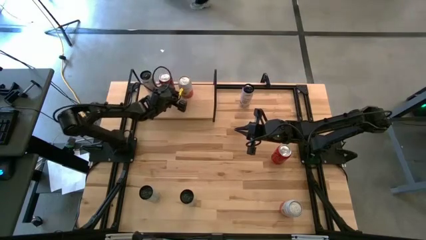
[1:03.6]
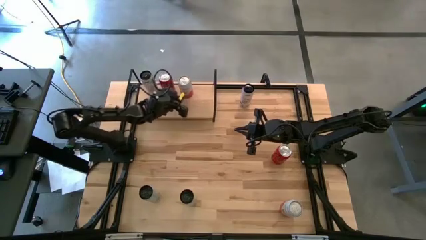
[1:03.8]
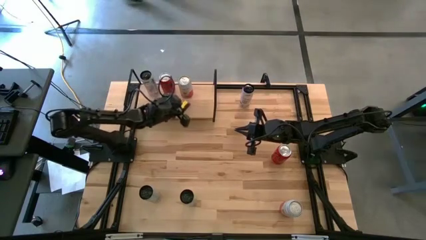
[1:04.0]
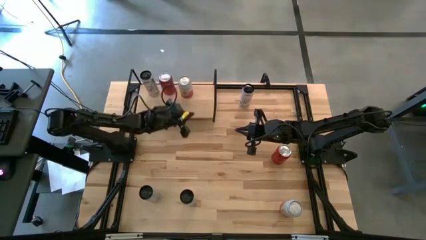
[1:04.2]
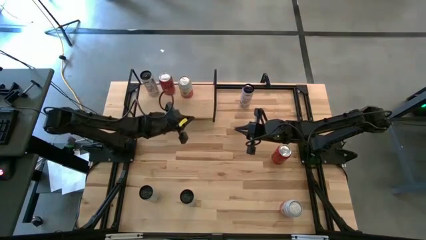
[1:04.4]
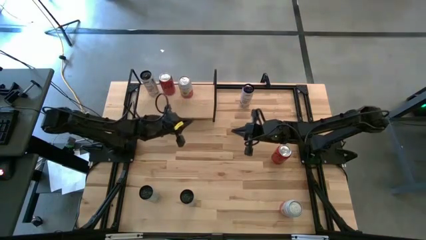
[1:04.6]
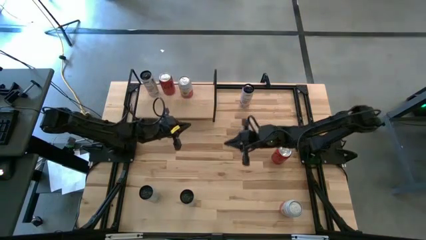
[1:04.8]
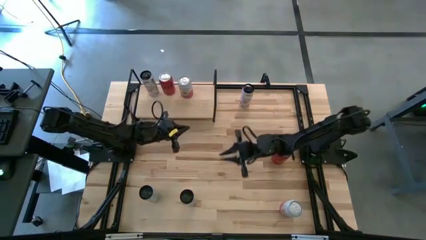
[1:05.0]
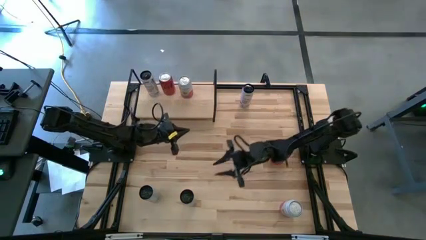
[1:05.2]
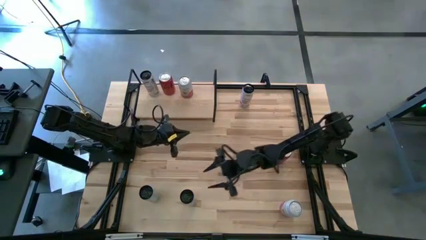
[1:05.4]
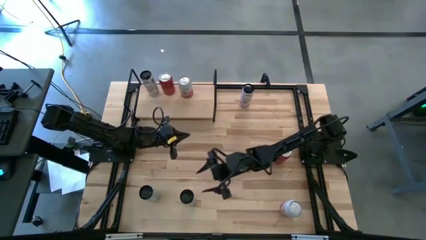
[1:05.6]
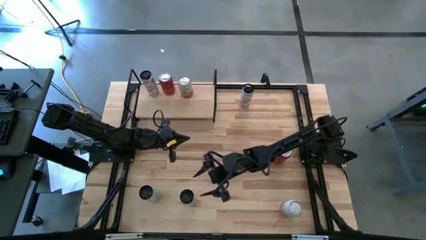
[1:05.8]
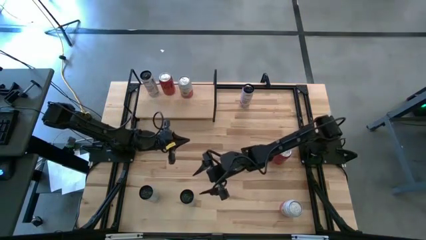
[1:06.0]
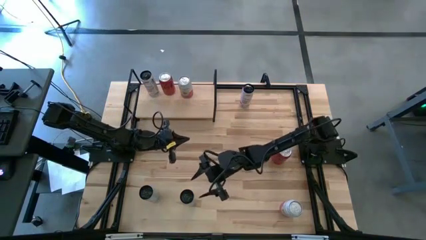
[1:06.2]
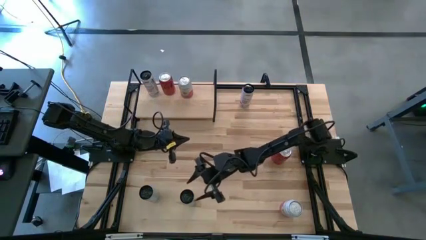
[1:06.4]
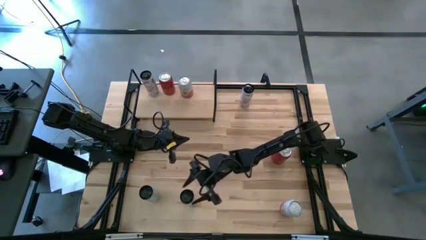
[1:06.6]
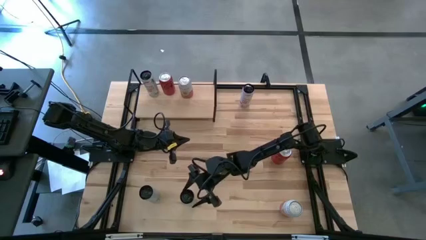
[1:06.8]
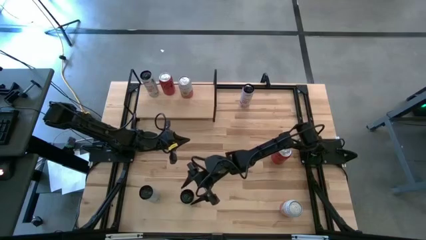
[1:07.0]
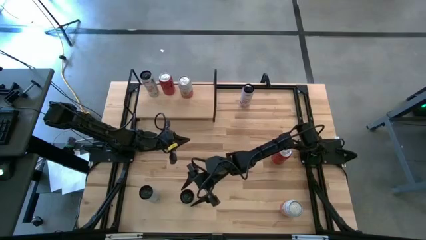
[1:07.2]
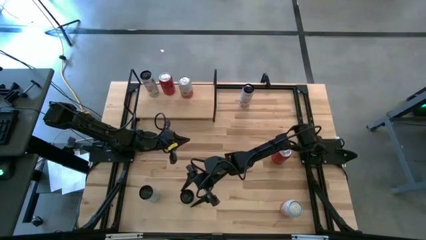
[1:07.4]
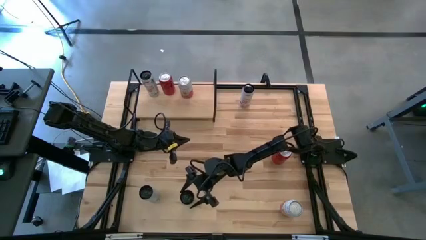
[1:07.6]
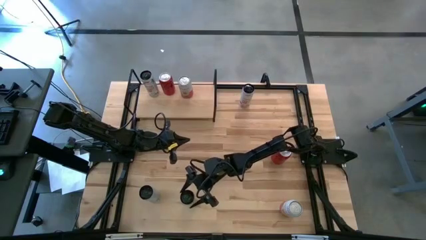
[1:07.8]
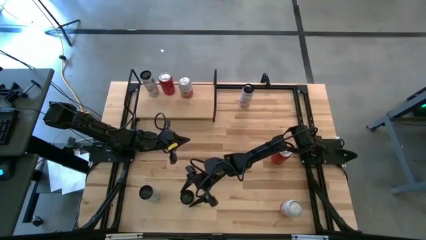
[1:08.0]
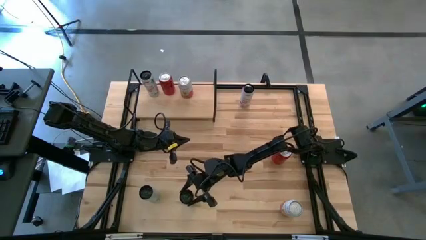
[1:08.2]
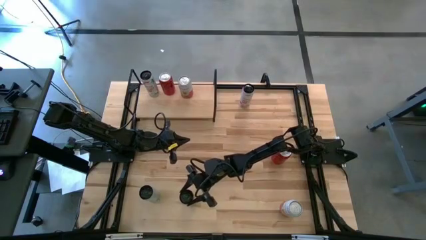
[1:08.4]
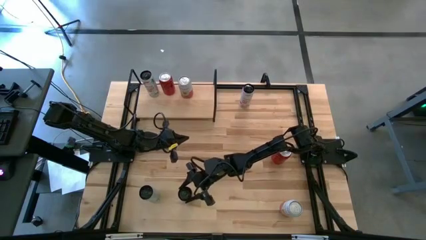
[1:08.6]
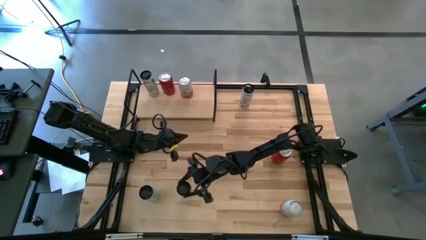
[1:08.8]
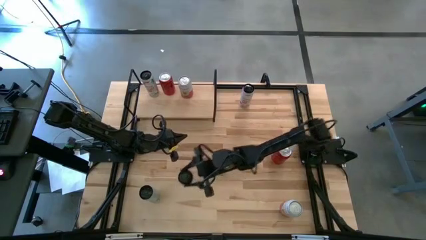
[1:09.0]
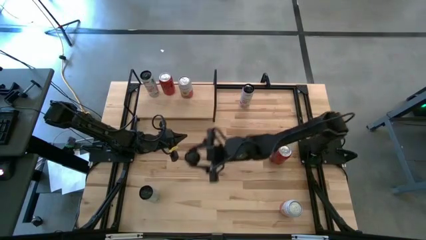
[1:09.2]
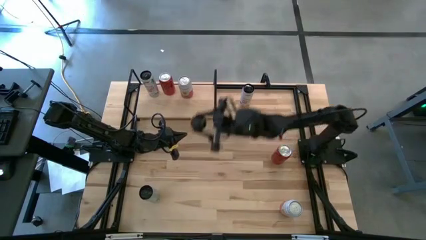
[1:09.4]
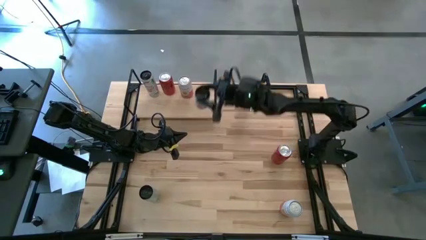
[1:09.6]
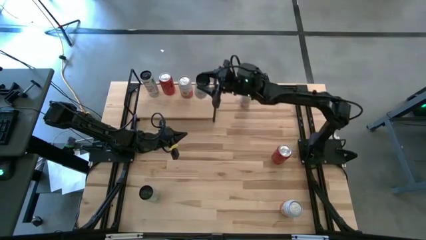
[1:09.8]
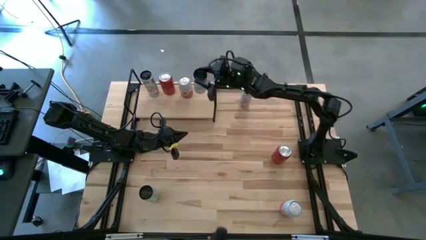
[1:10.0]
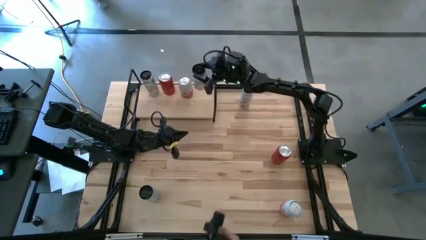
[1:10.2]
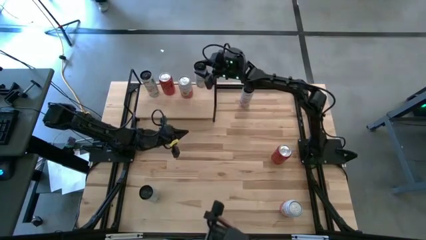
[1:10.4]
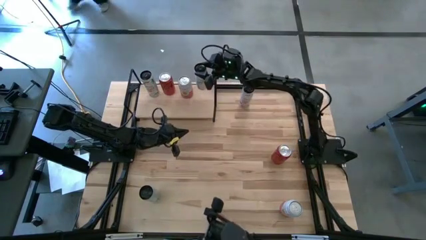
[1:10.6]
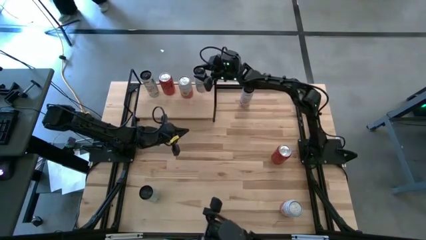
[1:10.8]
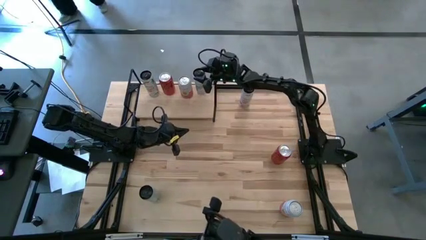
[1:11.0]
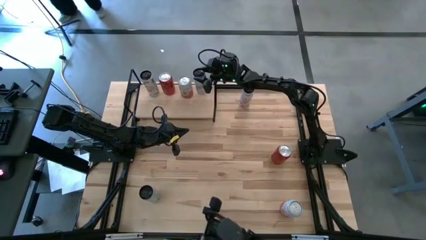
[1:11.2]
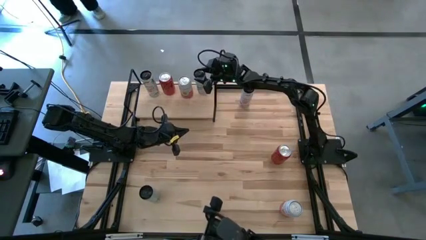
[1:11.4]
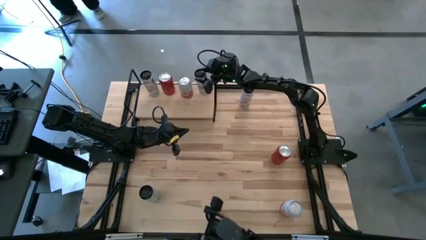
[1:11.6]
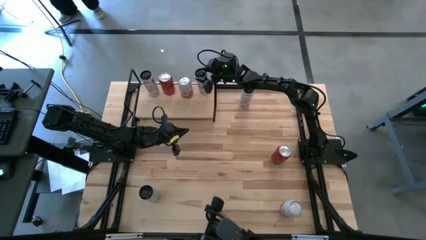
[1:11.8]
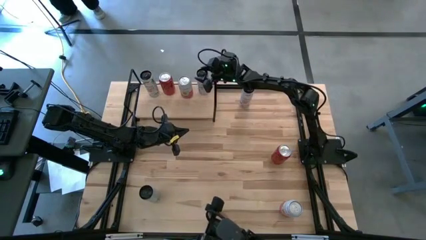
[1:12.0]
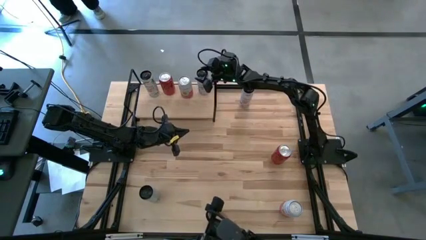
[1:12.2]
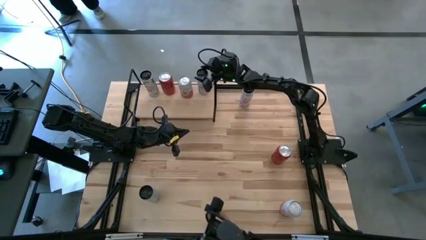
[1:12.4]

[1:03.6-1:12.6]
Task: Place canned beverage on shelf
Put the right white-blue soda can on the shelf

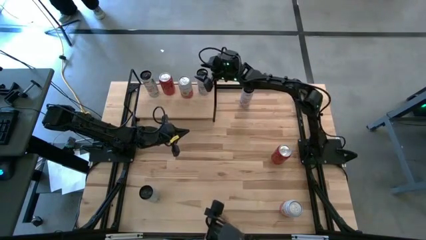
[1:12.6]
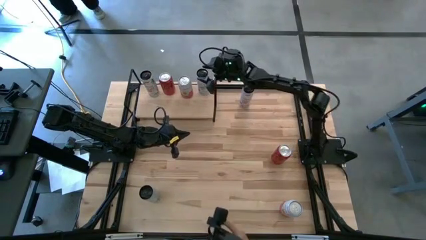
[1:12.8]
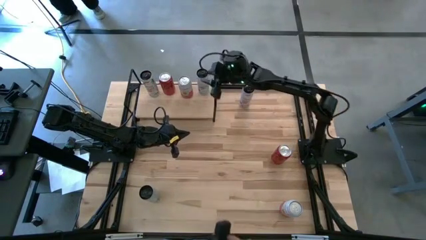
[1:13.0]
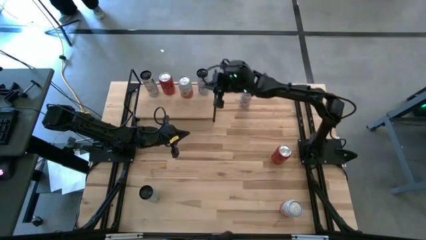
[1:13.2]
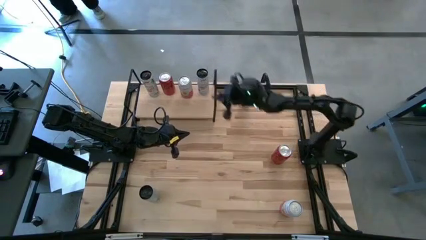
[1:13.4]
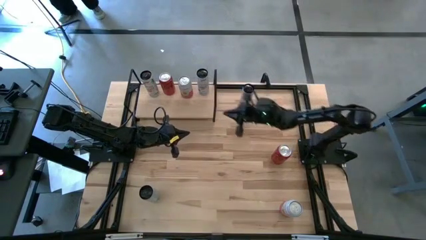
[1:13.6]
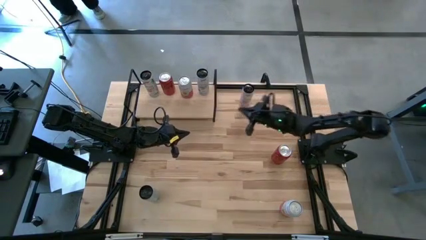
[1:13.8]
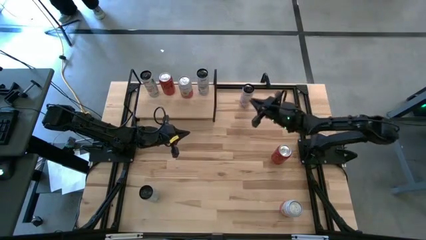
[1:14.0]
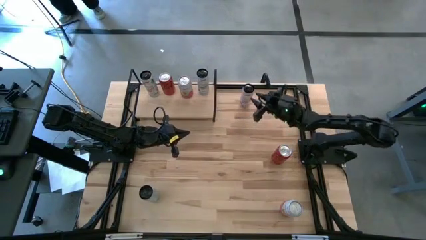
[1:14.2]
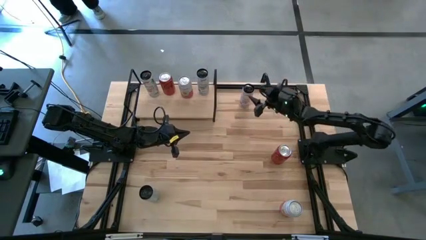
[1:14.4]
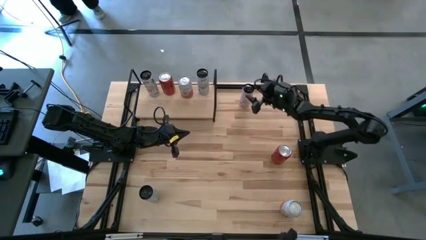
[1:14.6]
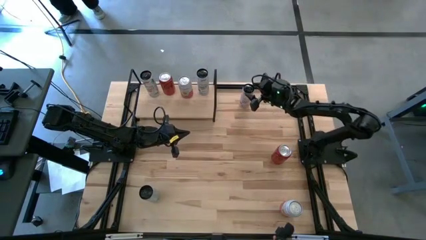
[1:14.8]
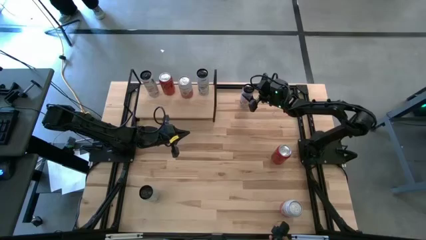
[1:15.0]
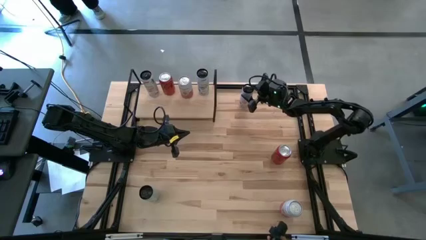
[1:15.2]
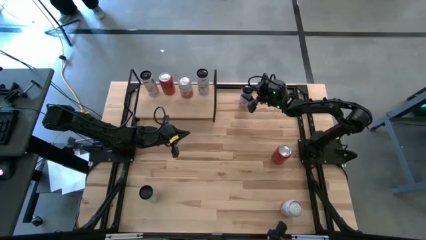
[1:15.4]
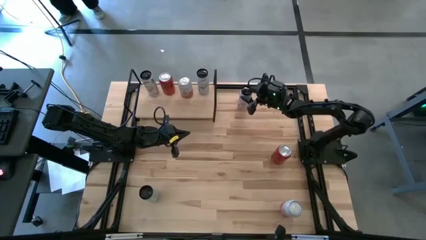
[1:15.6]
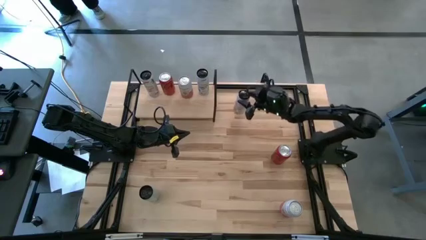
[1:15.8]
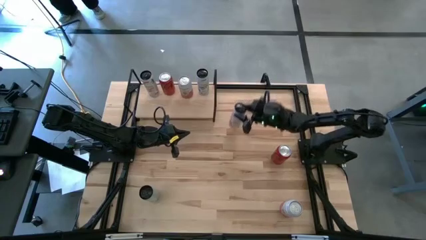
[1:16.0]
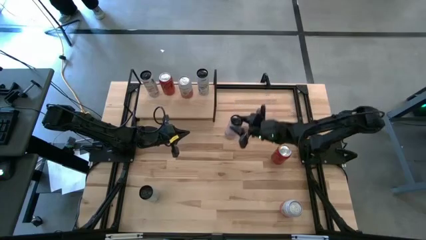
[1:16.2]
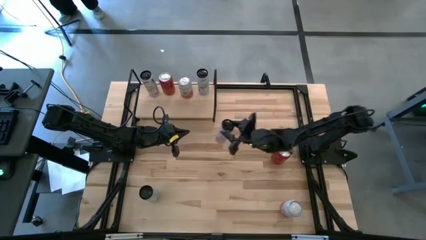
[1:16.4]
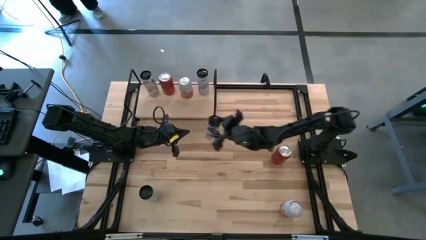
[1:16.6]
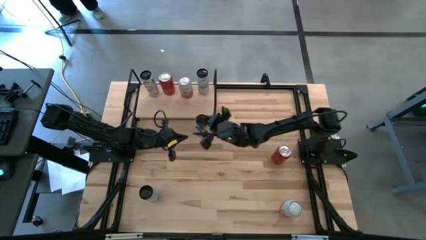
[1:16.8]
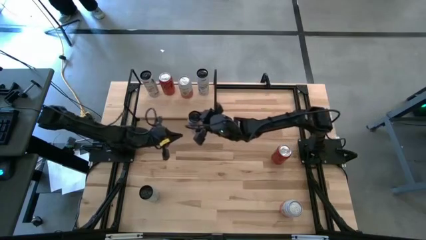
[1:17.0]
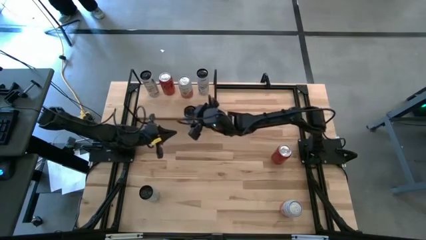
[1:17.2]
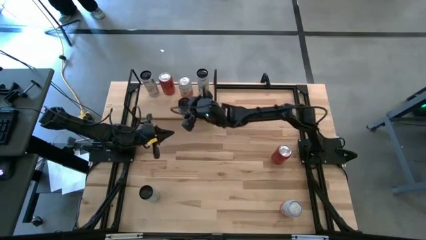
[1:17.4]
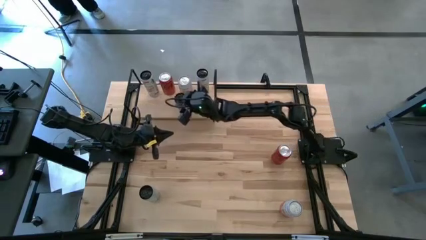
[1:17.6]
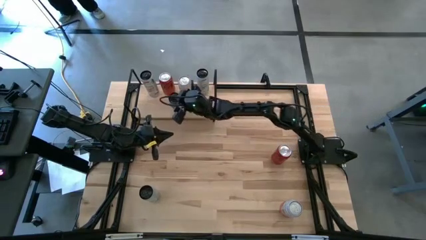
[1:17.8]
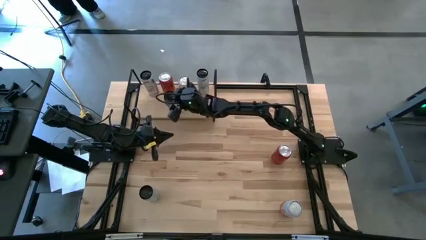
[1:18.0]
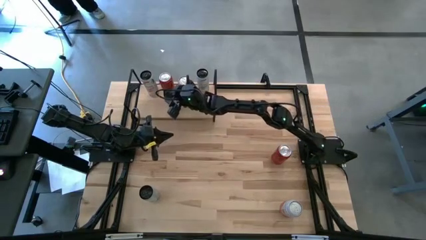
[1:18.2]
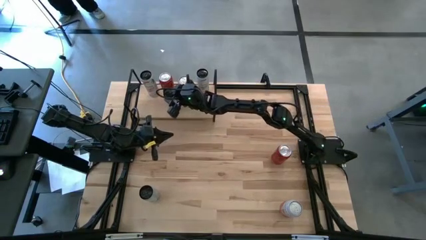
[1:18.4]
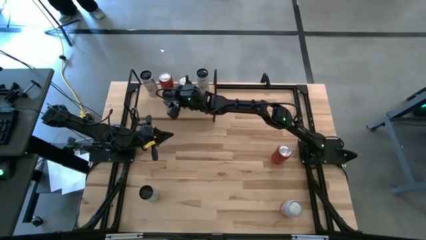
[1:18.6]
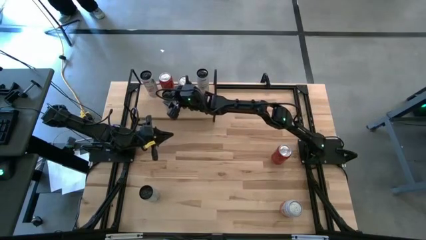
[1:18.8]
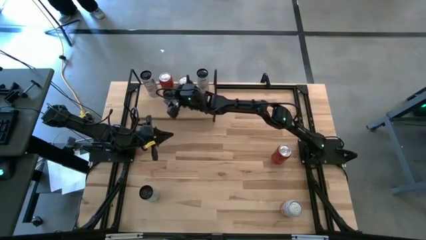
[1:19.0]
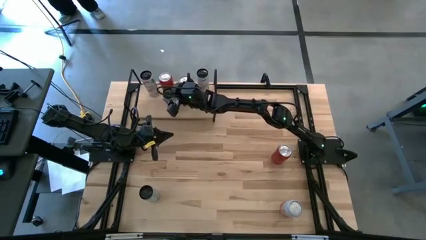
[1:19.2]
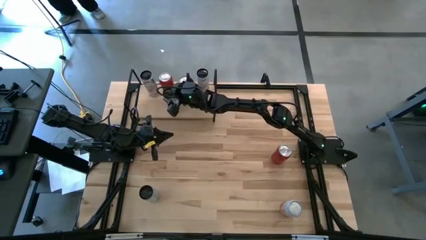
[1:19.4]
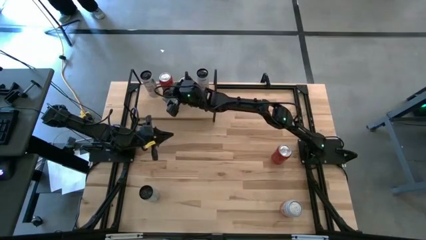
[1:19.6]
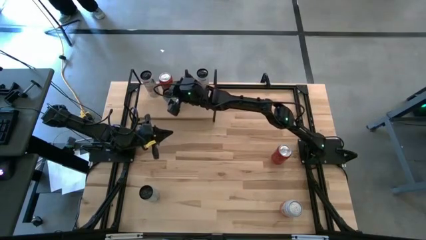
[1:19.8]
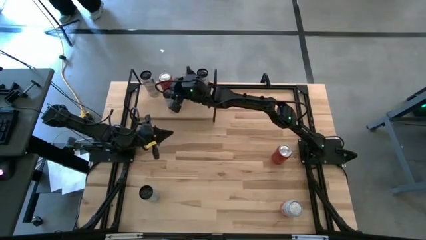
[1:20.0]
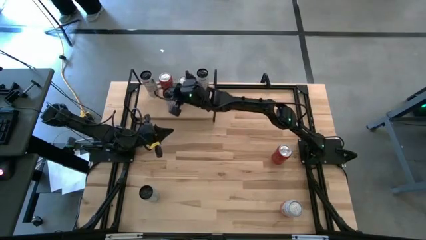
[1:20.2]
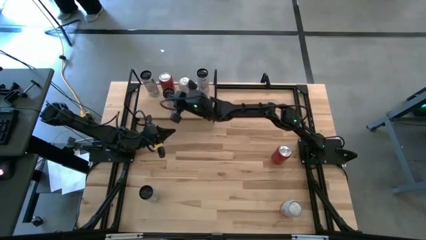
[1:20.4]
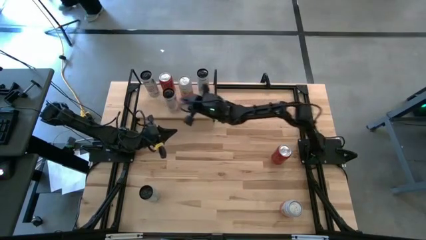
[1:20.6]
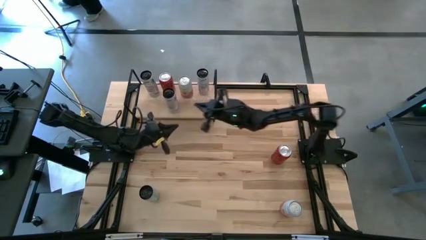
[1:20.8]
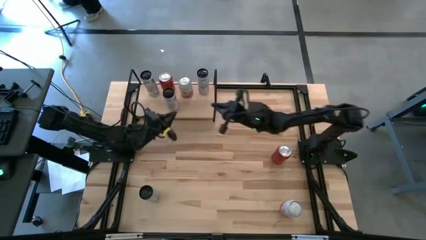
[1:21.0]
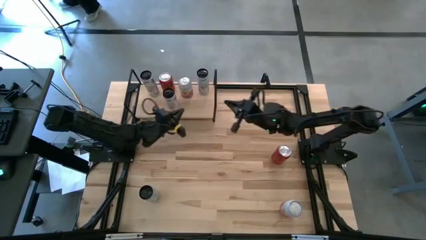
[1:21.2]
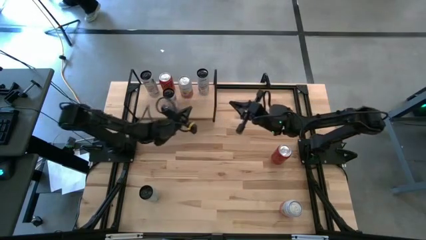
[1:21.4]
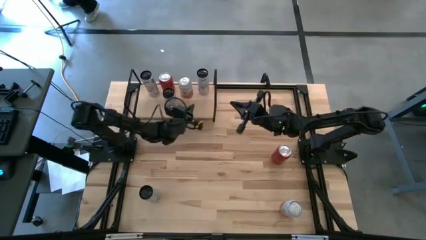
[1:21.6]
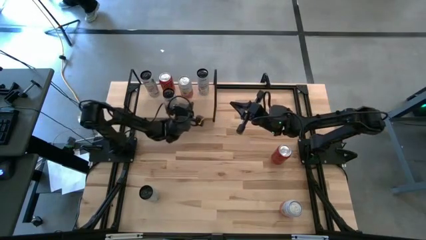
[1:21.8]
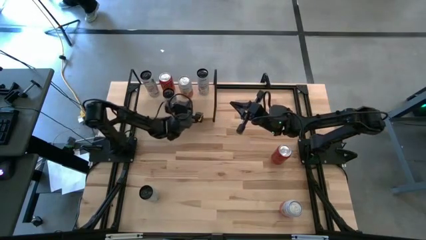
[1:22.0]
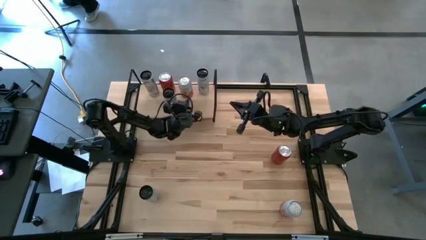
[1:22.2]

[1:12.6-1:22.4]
Put the white-pink soda can on the shelf aligned with the other white-pink soda can
